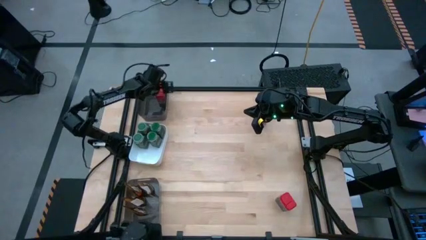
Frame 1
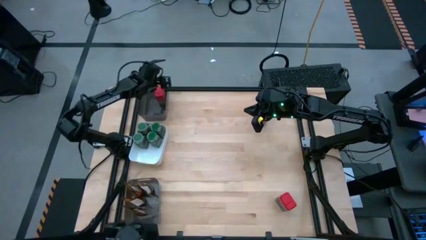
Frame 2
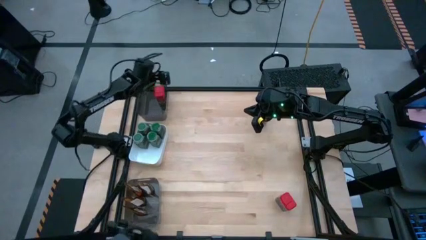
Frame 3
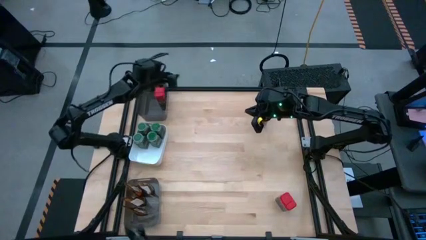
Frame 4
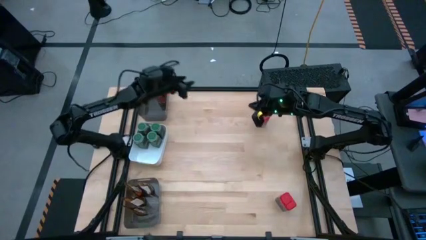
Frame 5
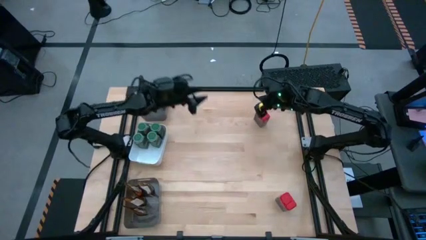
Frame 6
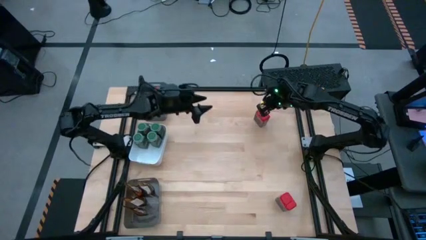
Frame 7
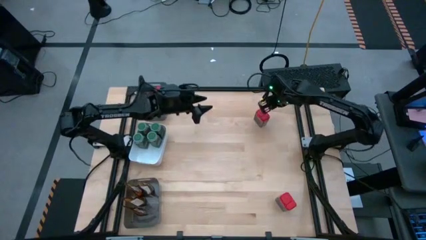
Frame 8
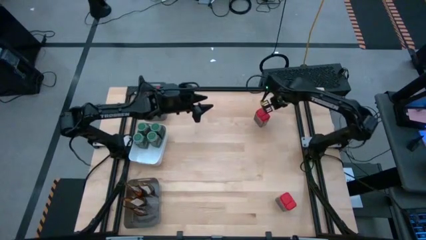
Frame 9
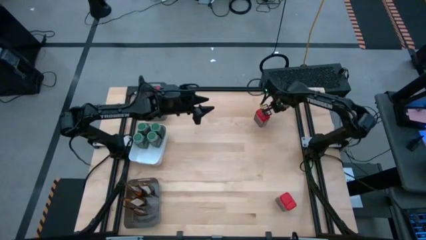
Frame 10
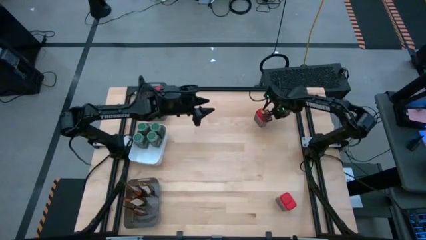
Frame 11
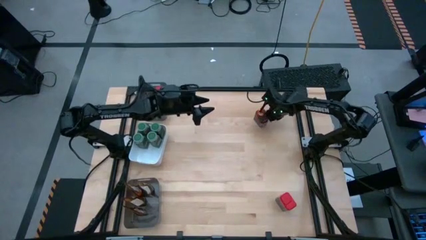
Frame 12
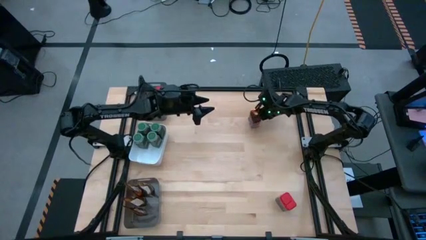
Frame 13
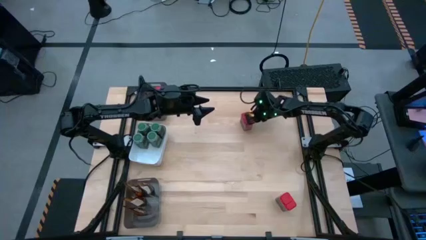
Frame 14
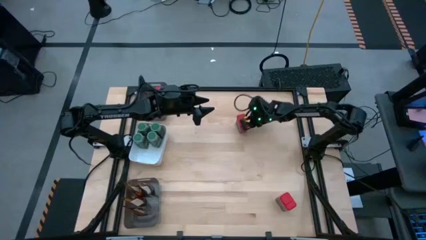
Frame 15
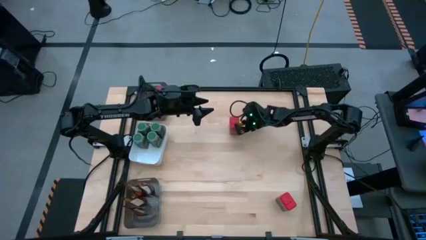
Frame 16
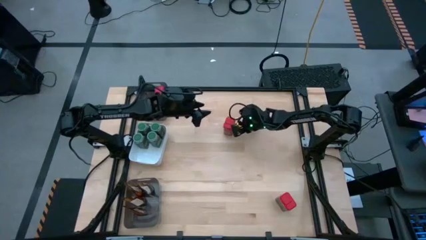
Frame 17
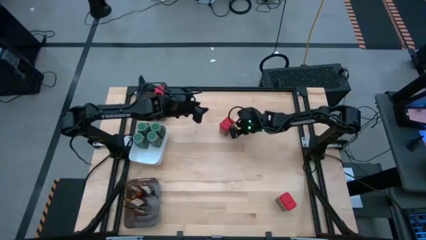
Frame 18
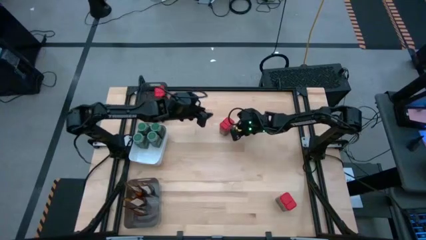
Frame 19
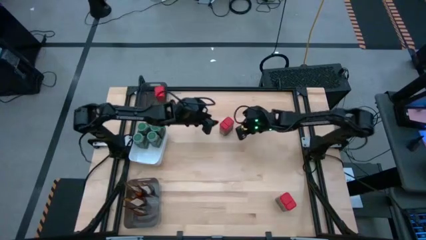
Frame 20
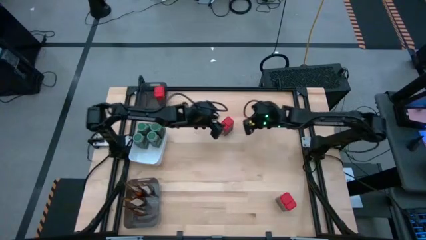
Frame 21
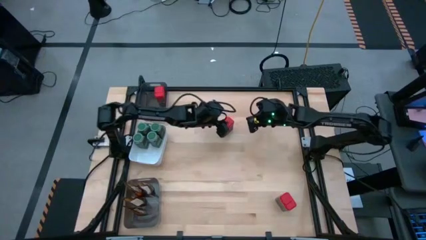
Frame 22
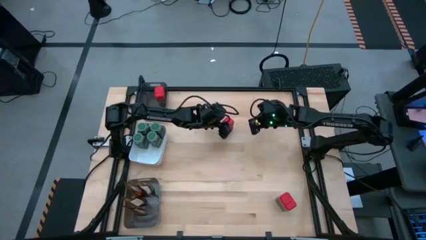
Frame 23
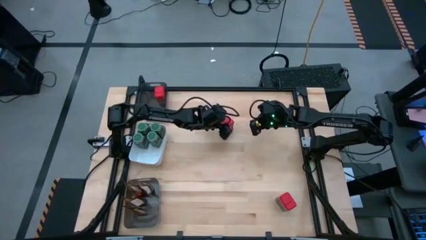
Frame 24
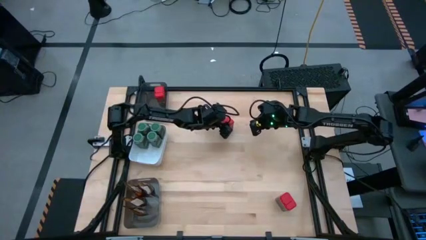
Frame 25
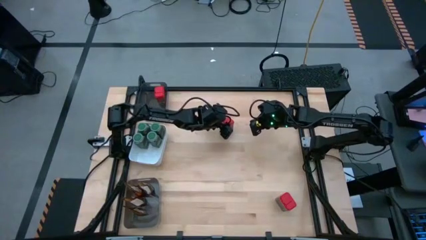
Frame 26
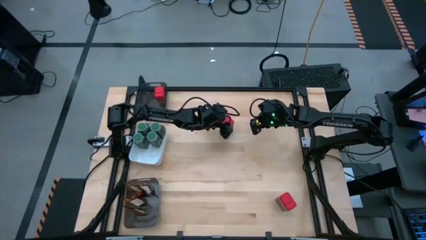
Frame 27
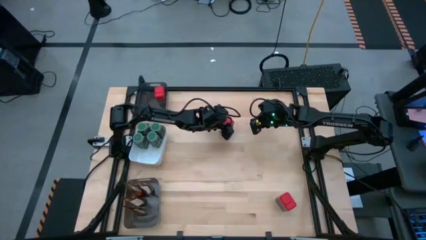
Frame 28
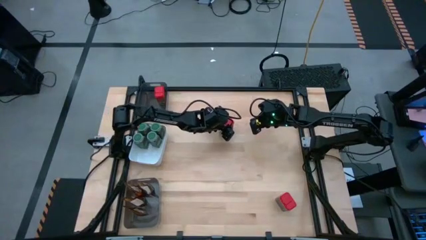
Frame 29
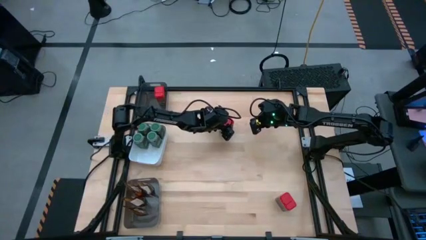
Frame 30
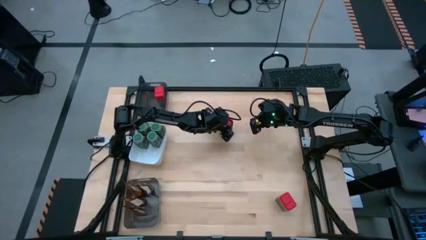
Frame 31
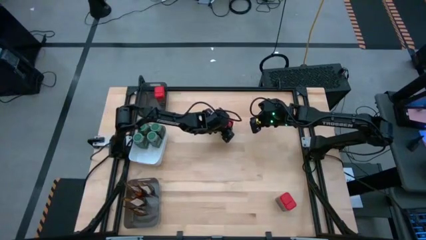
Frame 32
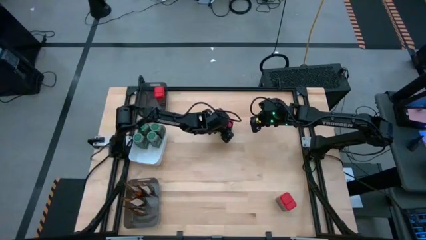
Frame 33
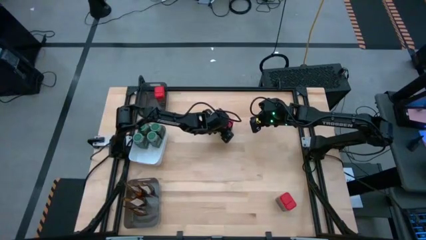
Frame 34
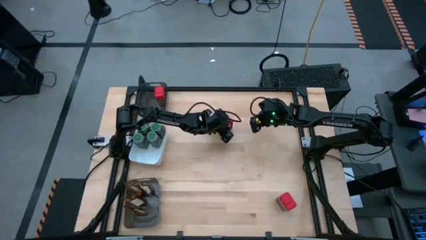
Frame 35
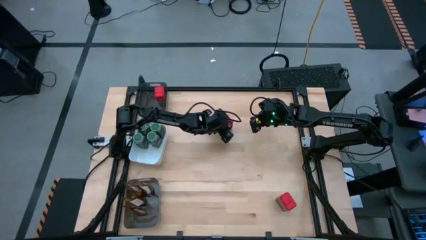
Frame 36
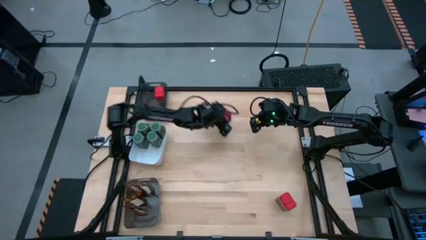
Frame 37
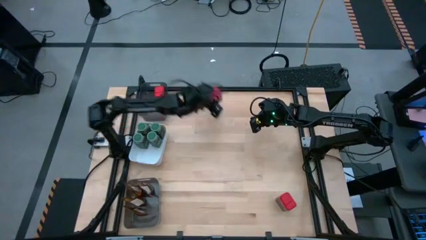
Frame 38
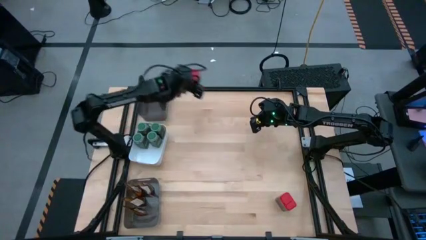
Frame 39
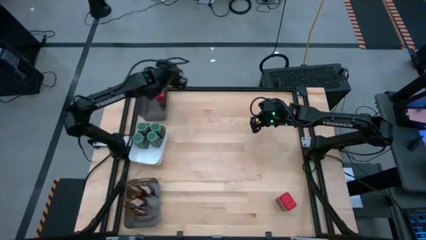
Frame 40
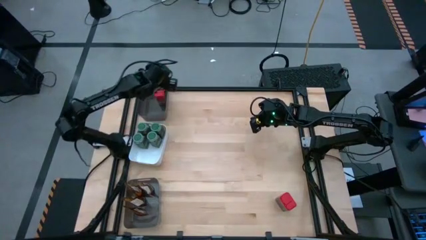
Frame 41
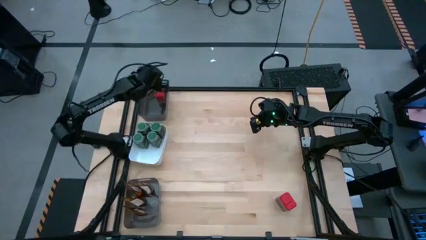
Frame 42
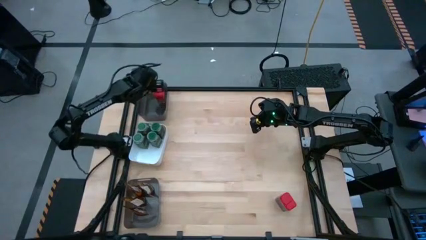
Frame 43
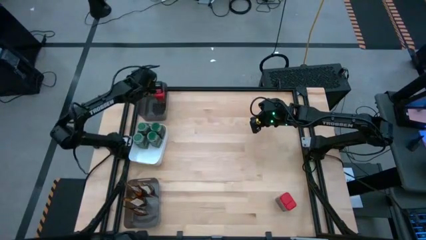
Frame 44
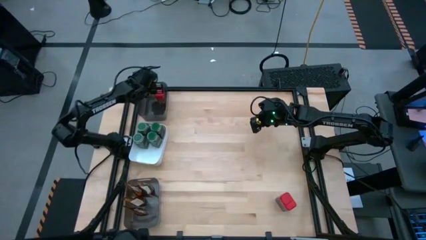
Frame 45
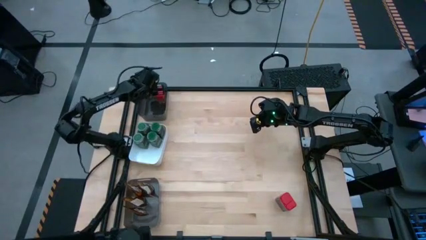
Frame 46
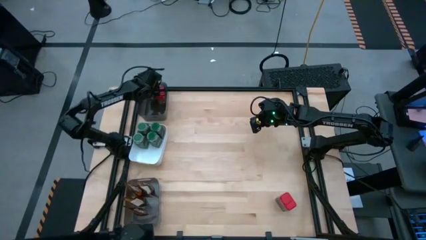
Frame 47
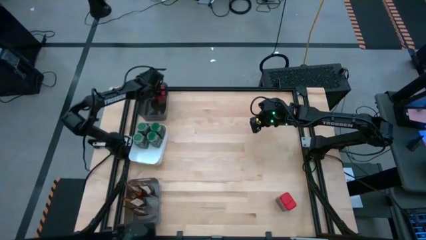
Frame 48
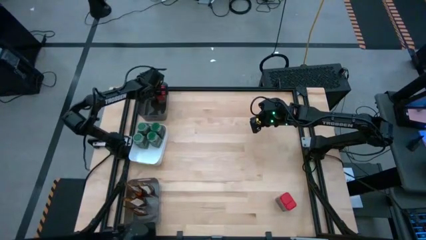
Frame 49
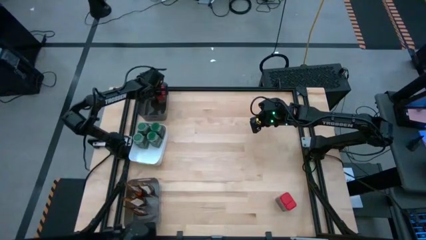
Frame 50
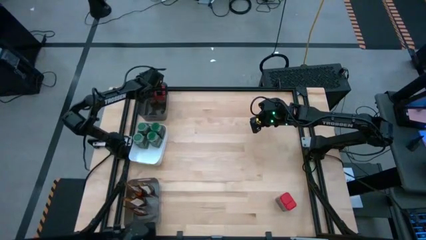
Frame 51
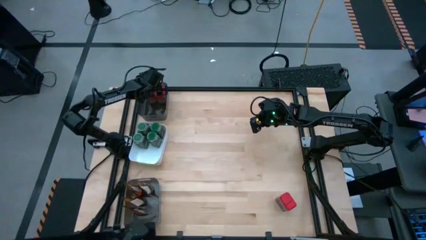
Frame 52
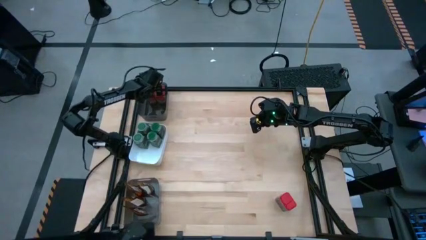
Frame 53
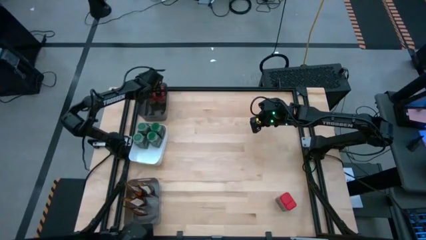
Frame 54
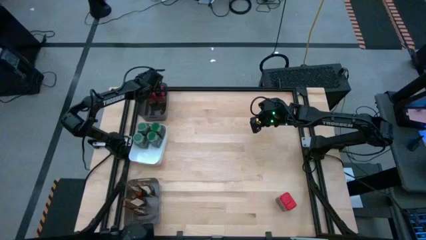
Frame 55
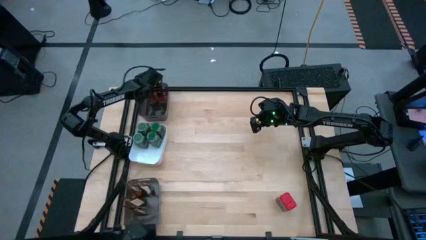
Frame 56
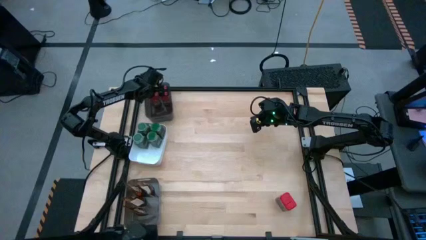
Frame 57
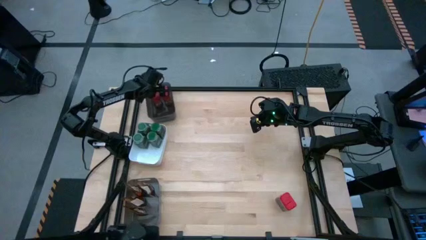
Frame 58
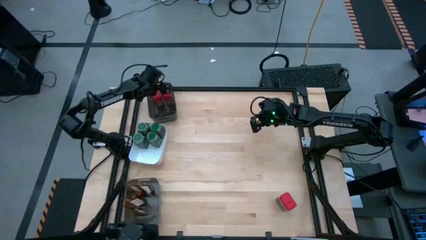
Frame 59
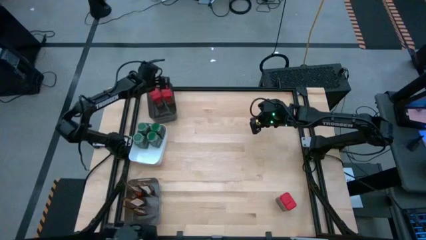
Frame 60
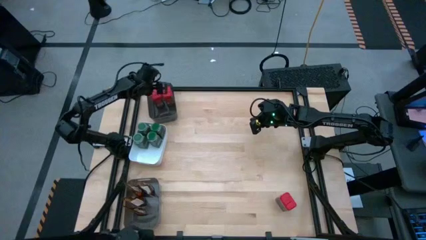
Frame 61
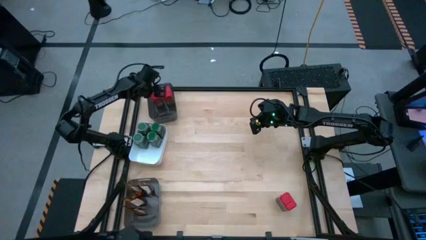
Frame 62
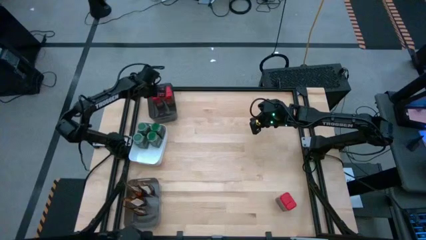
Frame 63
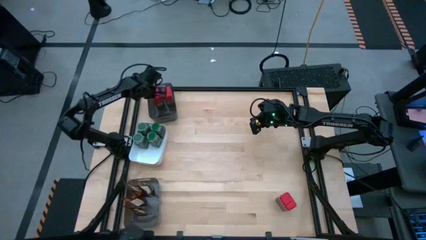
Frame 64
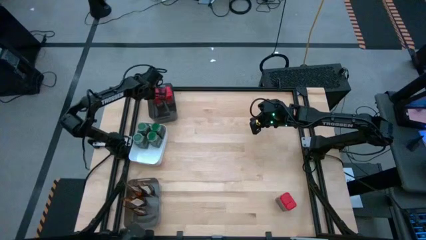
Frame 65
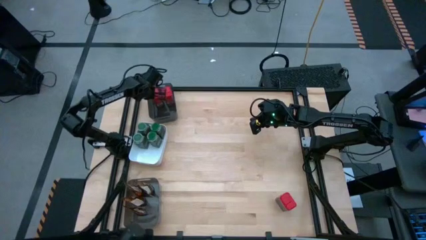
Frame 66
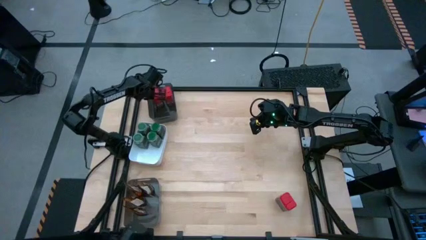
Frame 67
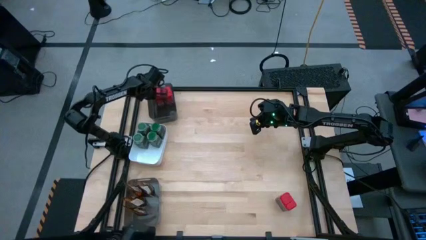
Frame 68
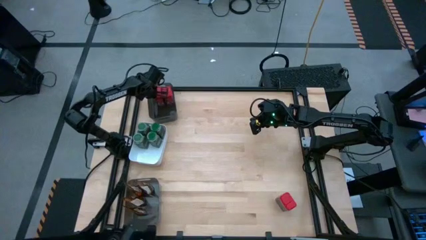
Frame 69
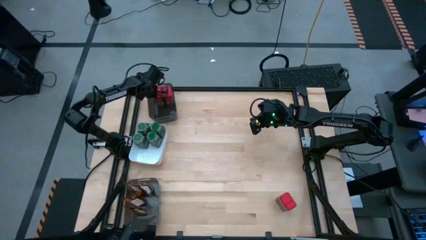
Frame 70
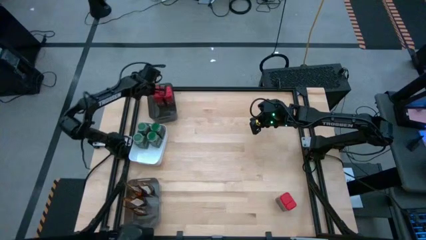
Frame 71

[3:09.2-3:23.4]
Task: Sort spices by type
Put the red seasoning can into the top black bin
